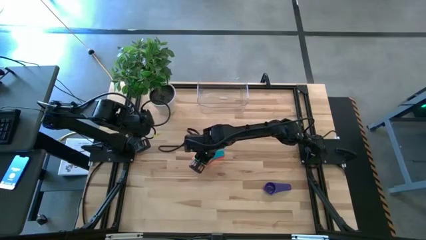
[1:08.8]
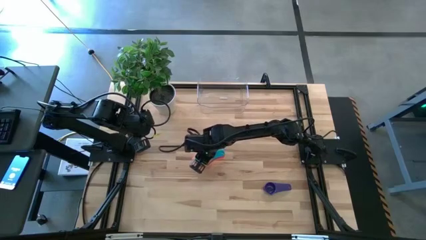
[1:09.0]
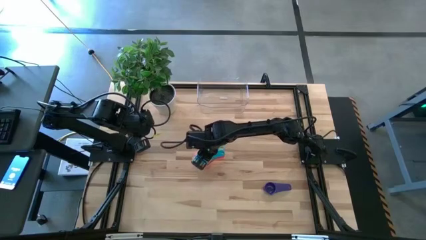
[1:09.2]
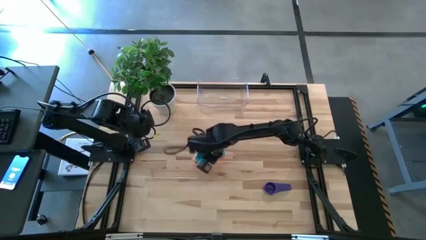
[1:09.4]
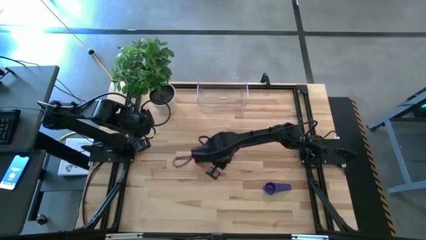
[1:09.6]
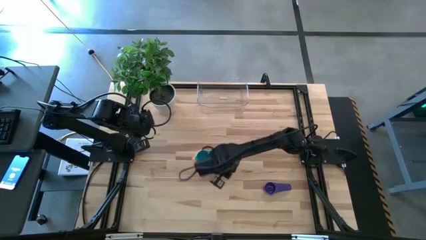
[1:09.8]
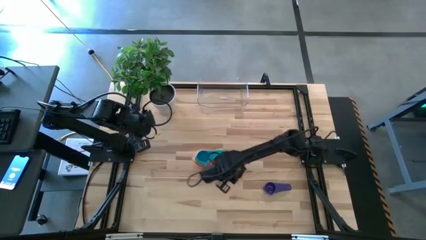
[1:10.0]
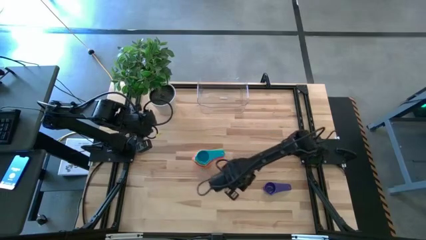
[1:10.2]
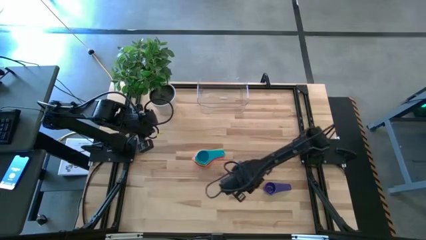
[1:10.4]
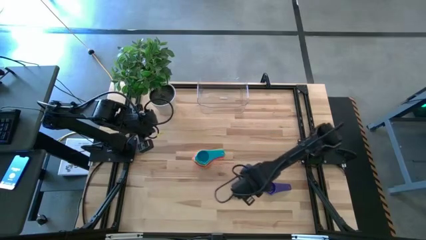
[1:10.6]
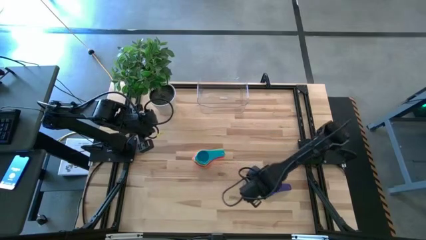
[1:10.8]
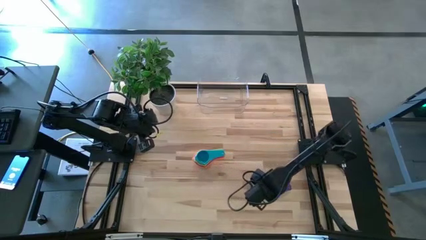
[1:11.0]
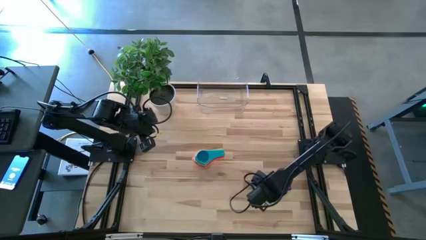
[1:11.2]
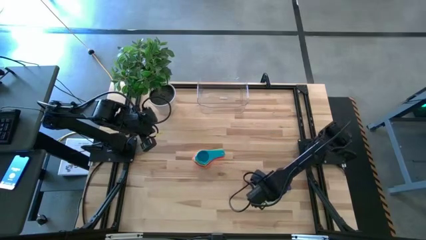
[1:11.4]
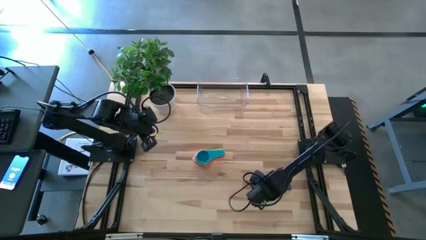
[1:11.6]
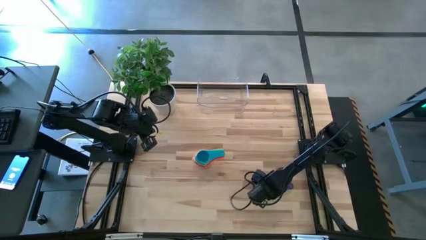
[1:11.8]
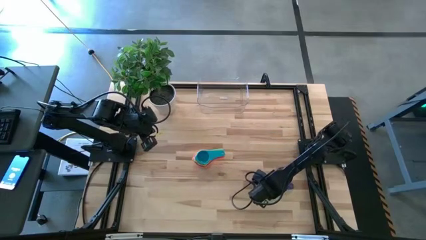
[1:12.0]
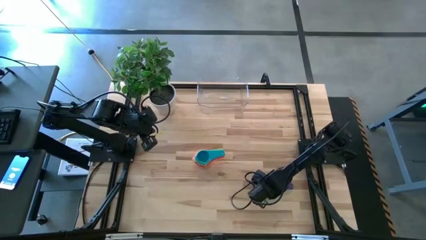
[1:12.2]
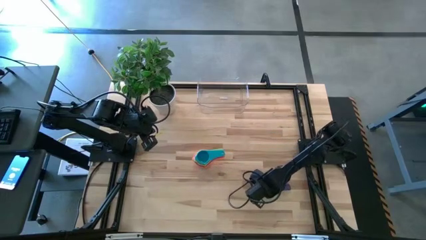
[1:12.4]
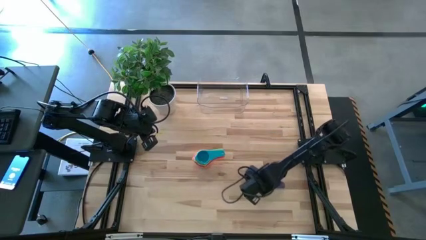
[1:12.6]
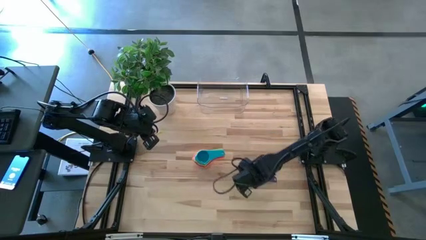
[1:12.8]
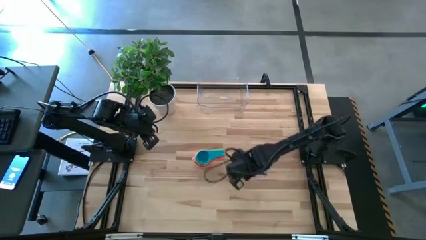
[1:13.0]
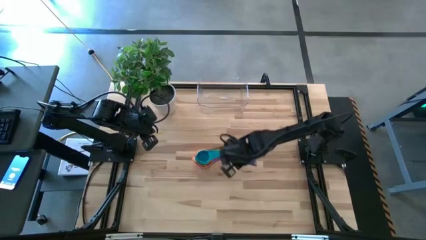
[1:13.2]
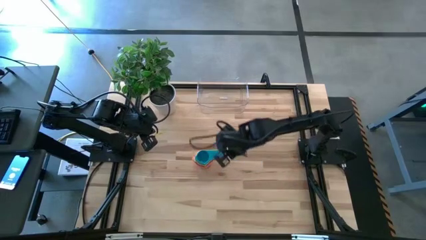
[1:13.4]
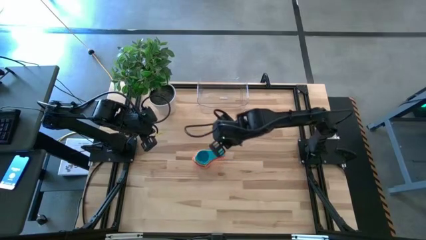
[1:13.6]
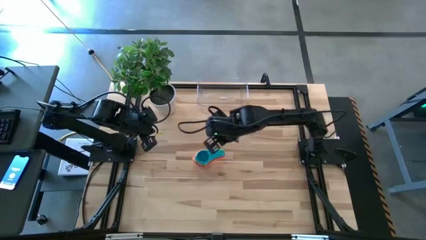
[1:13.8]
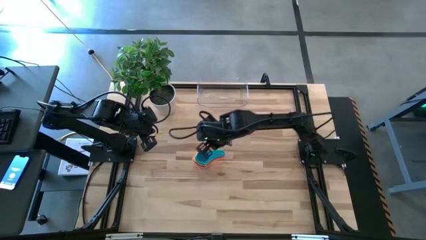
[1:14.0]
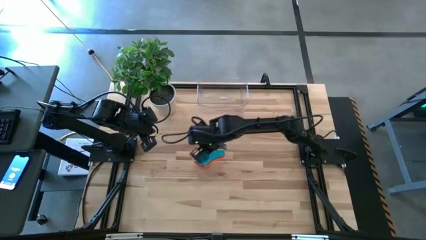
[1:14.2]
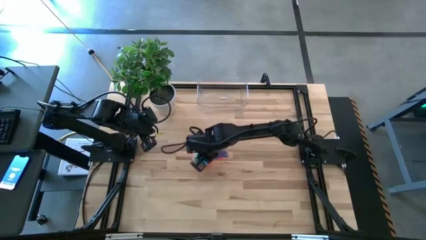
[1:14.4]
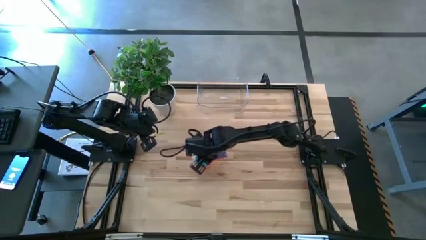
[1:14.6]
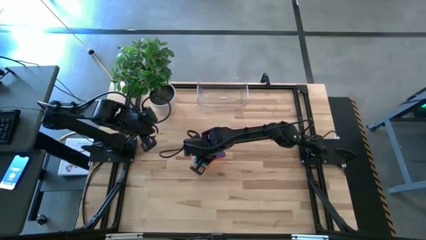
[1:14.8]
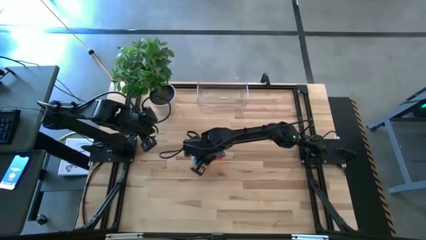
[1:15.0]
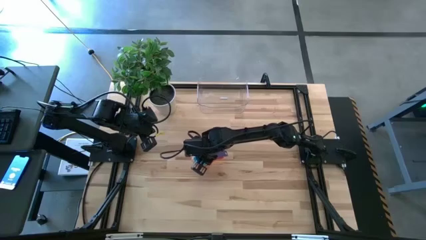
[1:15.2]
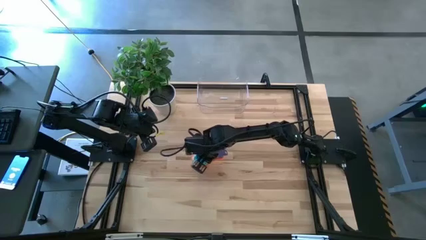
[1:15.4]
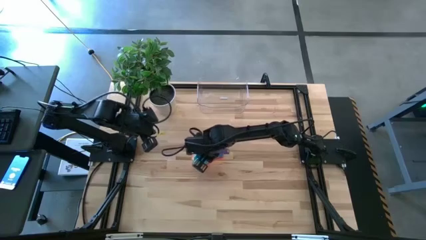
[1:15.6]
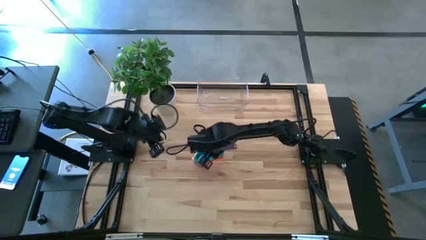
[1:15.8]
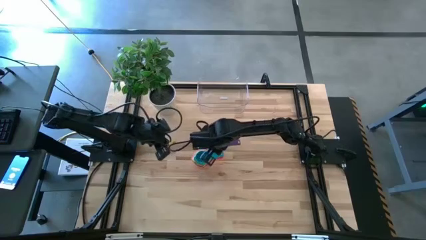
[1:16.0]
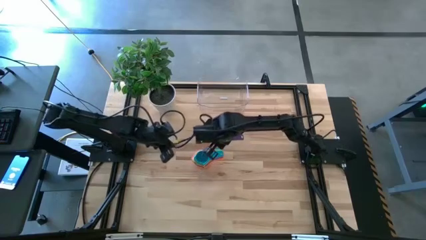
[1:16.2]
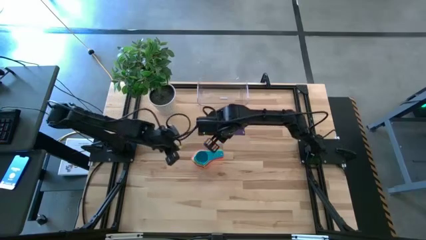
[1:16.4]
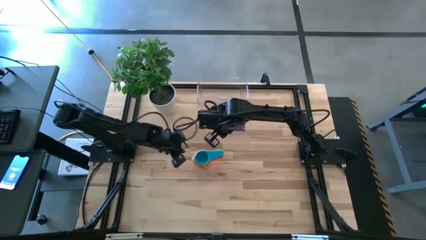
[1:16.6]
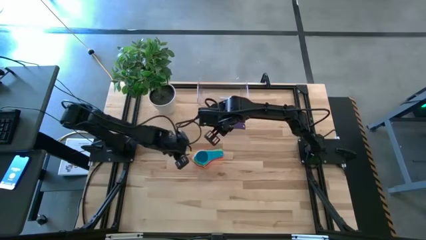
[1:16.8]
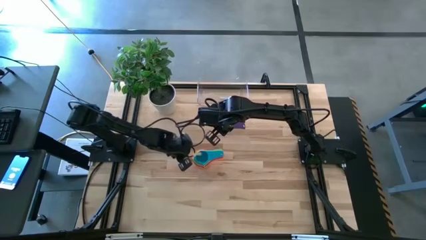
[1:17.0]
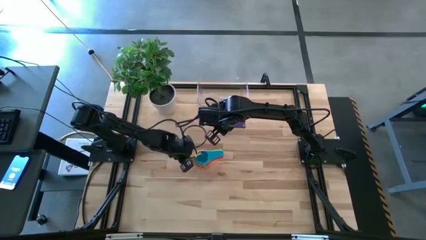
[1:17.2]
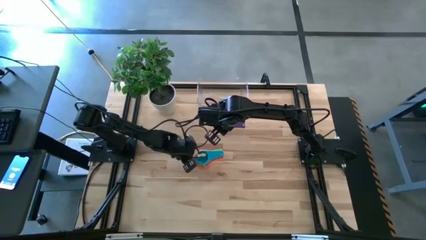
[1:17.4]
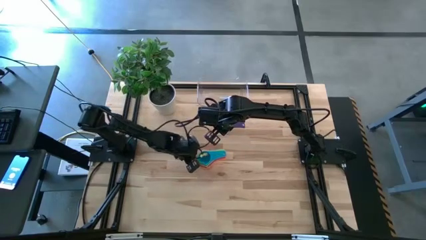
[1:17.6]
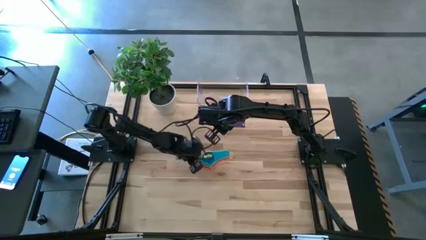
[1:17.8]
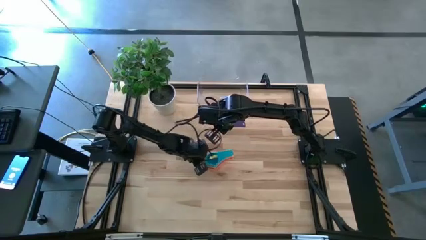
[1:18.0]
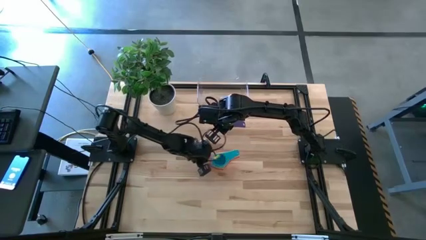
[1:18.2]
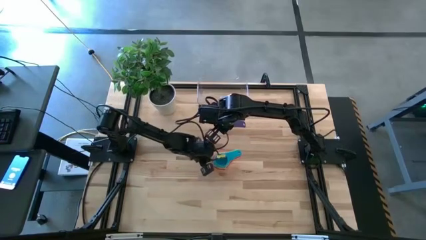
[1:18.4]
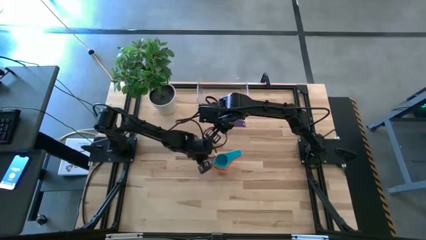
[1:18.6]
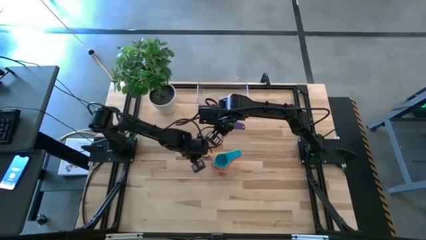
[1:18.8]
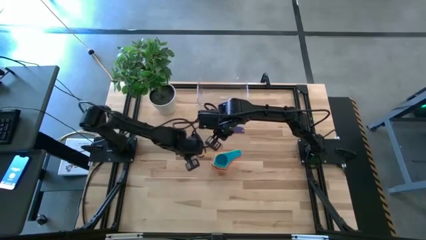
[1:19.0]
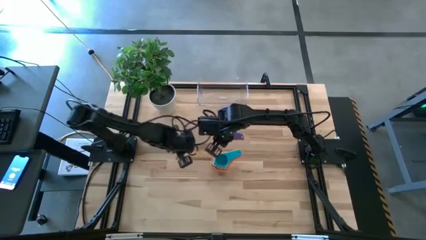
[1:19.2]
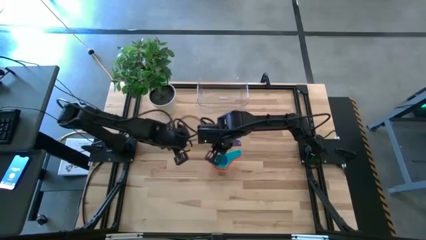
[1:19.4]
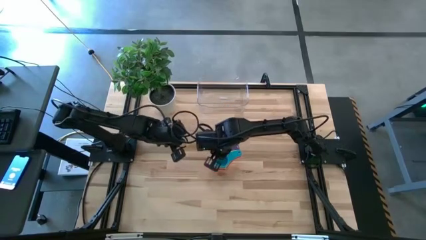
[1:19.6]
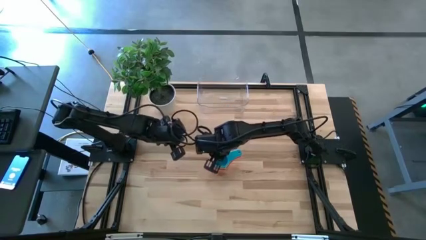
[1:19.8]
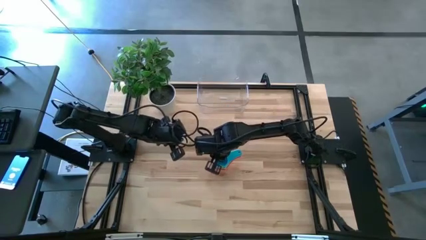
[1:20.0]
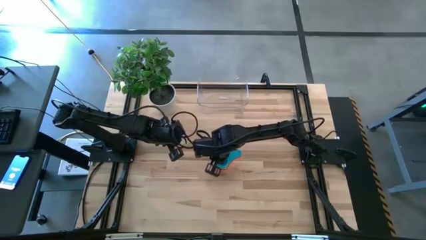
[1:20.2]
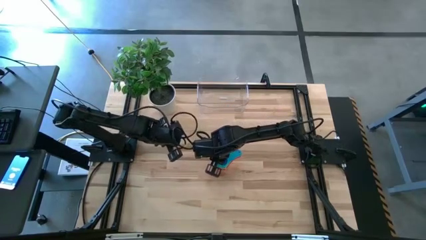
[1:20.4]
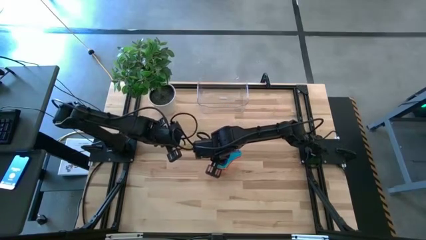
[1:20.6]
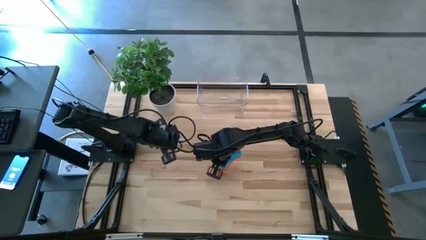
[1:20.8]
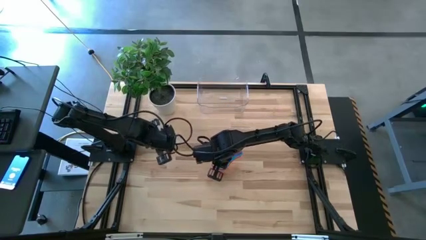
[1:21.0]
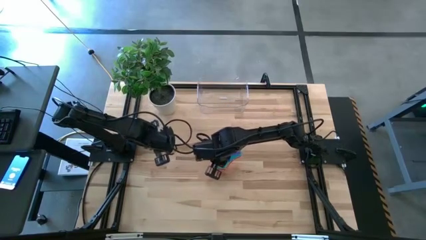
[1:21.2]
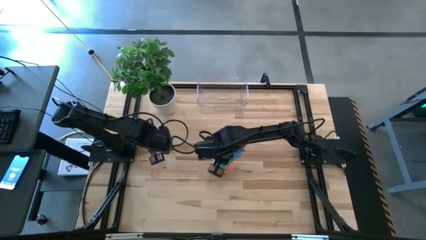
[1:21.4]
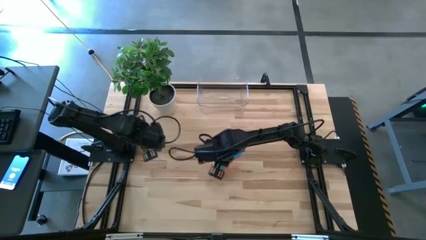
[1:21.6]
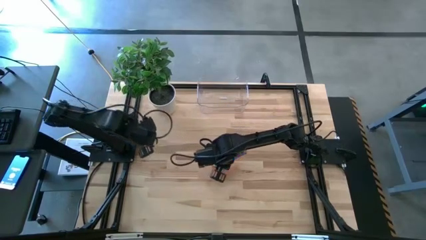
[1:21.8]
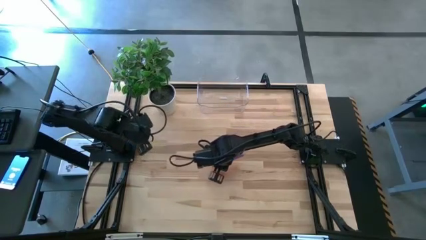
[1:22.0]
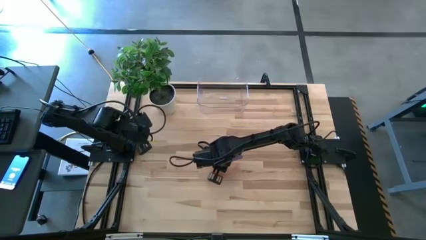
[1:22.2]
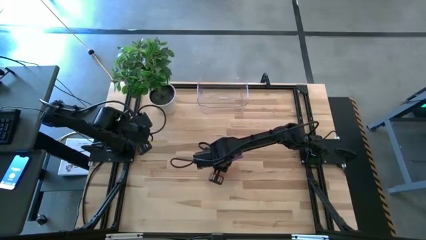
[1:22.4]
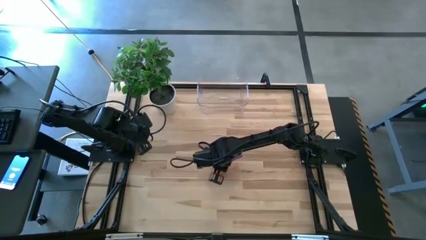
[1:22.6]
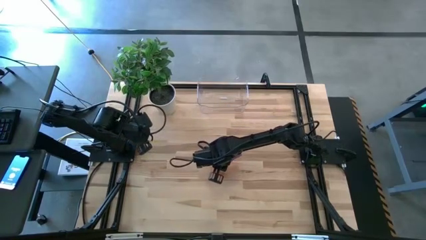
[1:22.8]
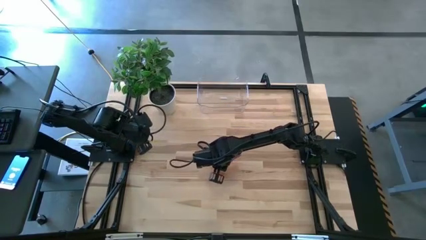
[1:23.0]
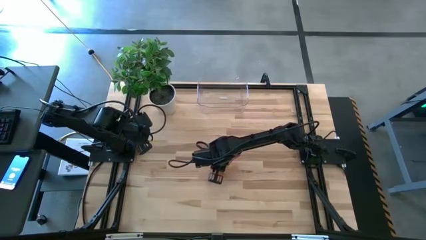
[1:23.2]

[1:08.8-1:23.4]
Task: Nest measuring cups in basket
Stack the dark blue measuring cup on top of the light blue measuring cup
